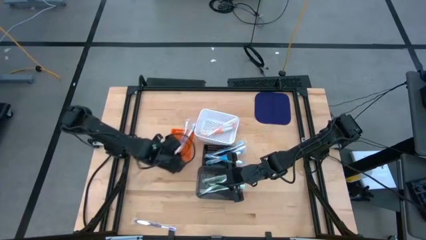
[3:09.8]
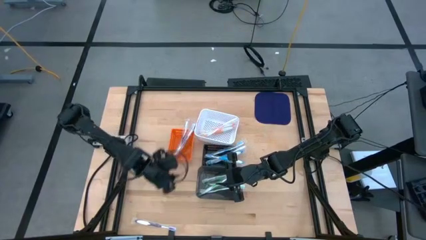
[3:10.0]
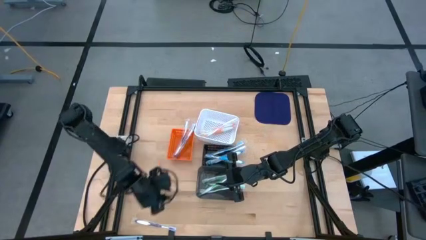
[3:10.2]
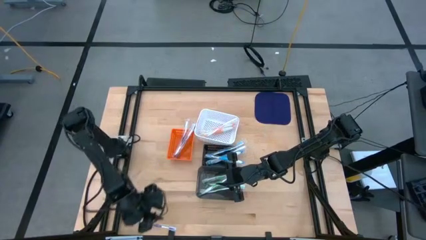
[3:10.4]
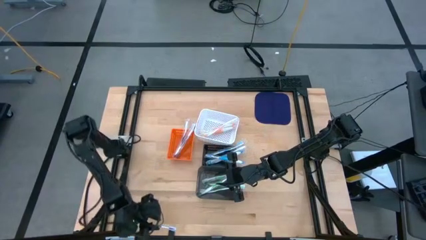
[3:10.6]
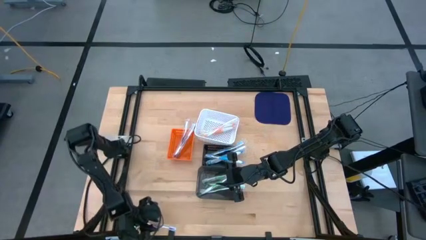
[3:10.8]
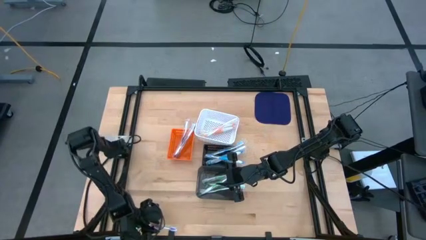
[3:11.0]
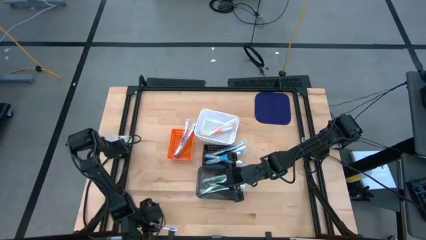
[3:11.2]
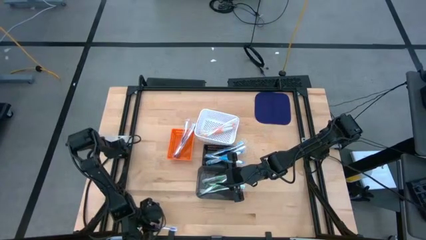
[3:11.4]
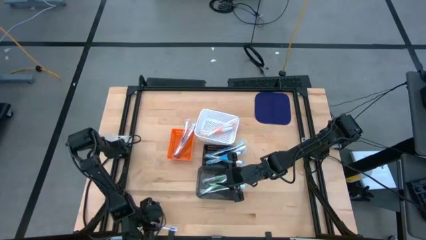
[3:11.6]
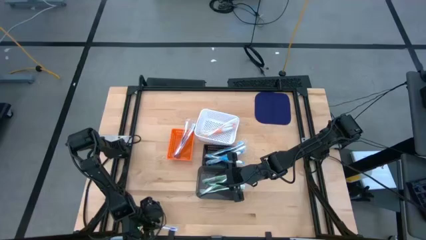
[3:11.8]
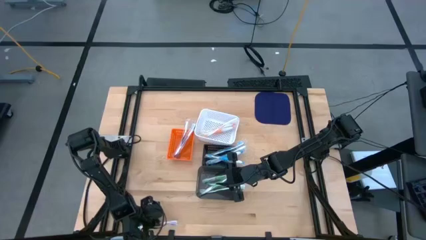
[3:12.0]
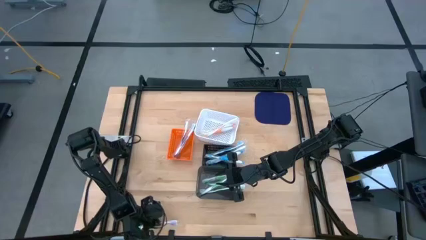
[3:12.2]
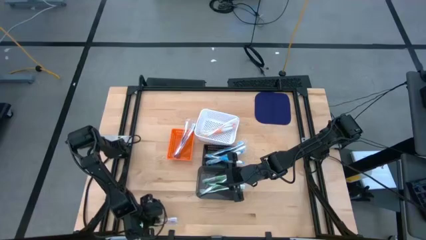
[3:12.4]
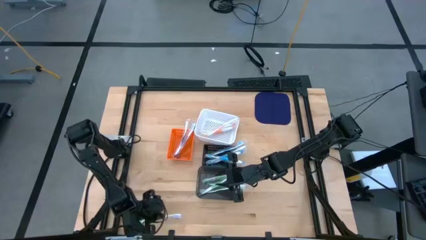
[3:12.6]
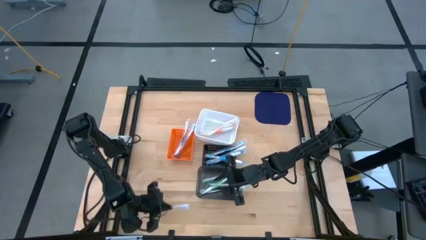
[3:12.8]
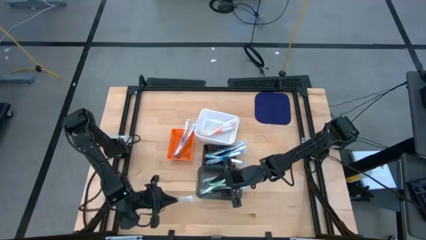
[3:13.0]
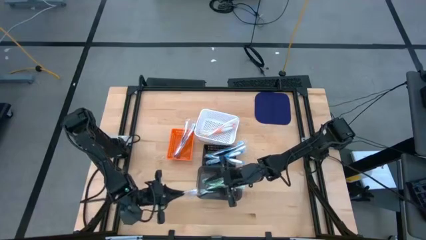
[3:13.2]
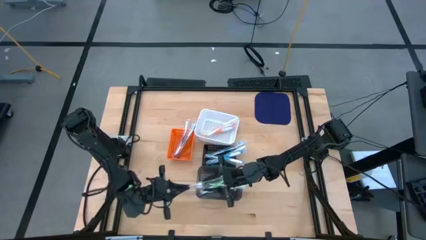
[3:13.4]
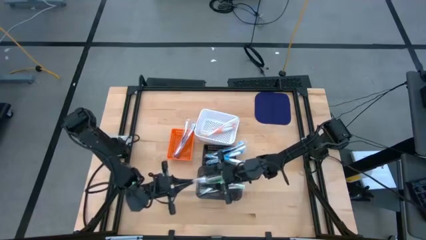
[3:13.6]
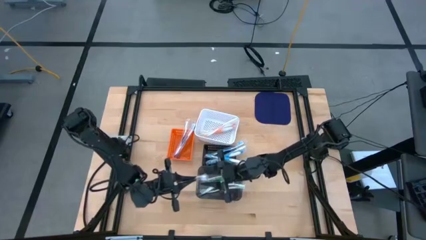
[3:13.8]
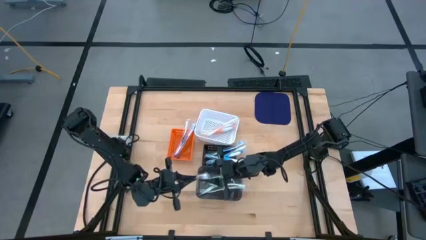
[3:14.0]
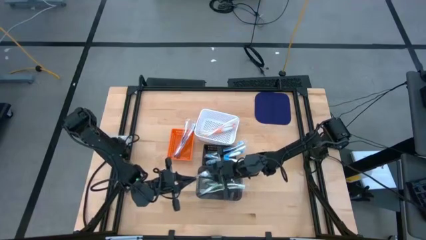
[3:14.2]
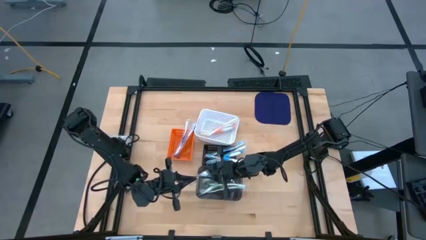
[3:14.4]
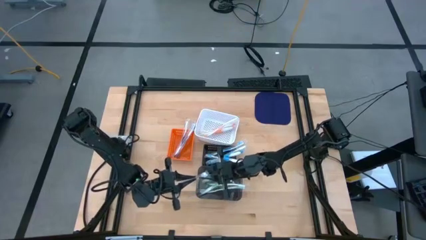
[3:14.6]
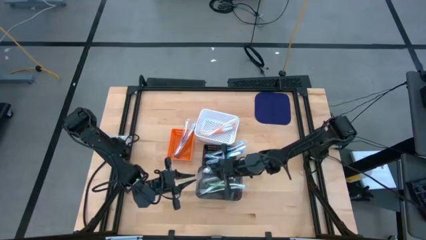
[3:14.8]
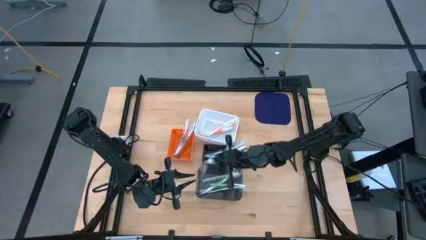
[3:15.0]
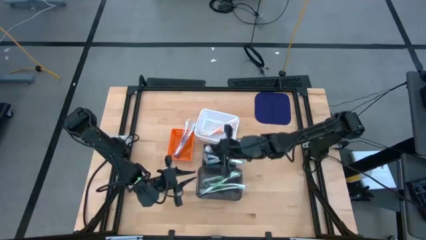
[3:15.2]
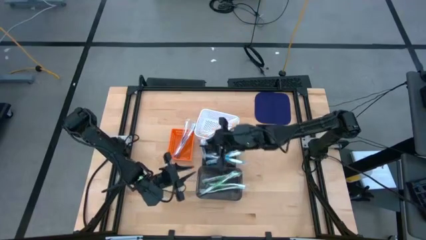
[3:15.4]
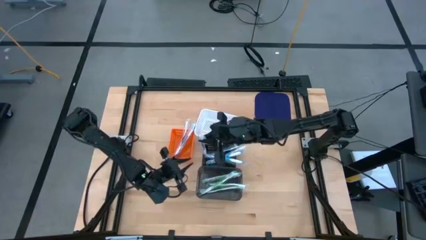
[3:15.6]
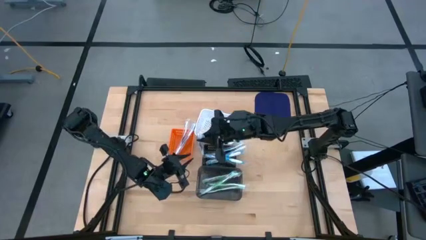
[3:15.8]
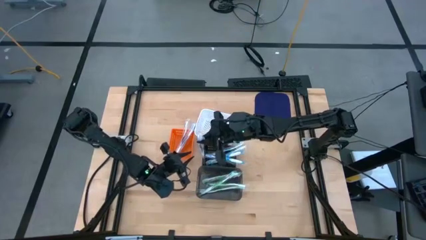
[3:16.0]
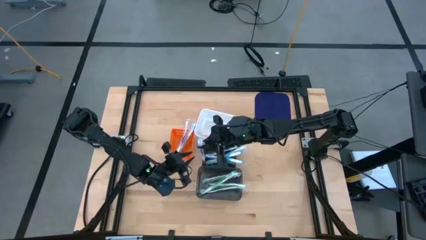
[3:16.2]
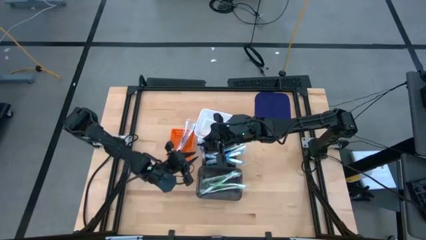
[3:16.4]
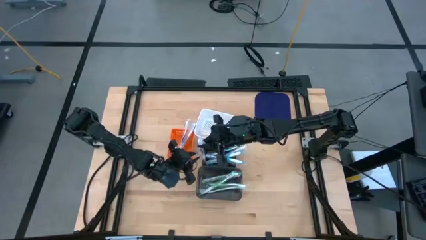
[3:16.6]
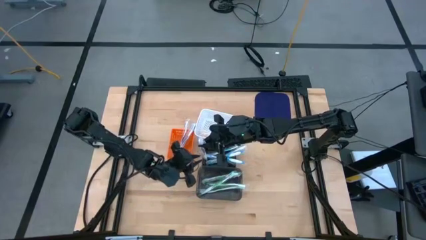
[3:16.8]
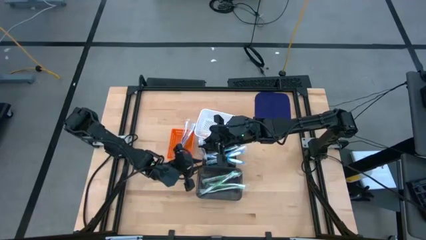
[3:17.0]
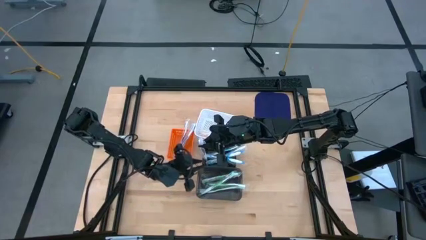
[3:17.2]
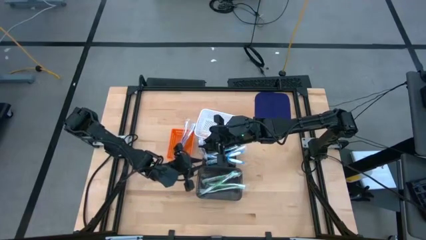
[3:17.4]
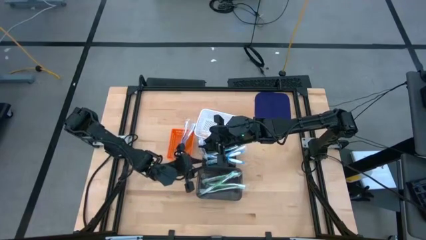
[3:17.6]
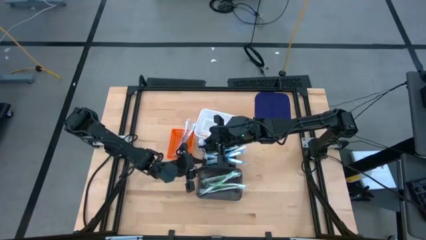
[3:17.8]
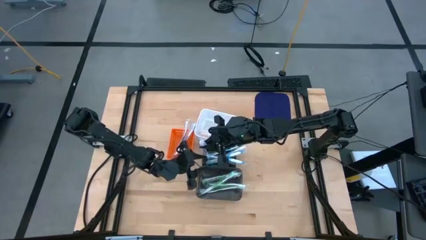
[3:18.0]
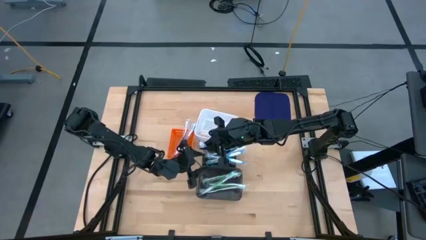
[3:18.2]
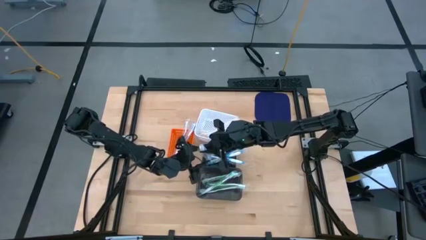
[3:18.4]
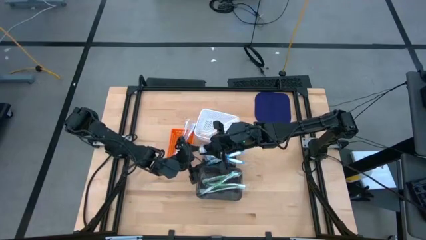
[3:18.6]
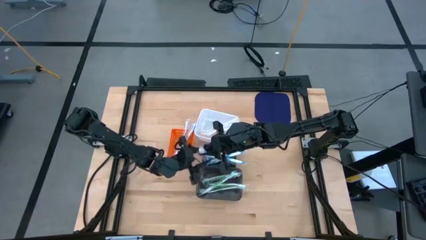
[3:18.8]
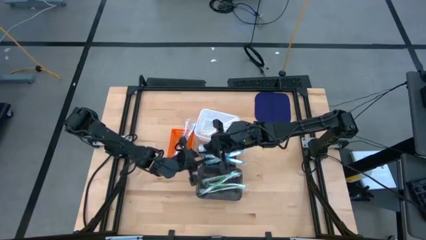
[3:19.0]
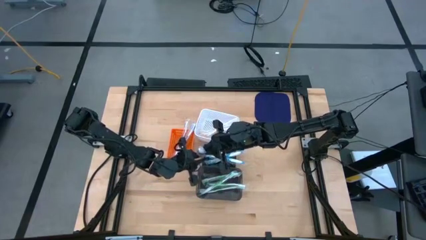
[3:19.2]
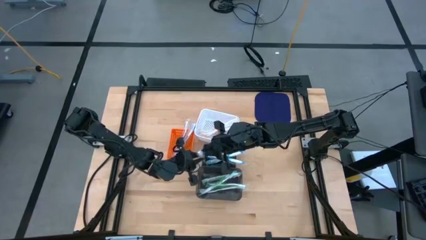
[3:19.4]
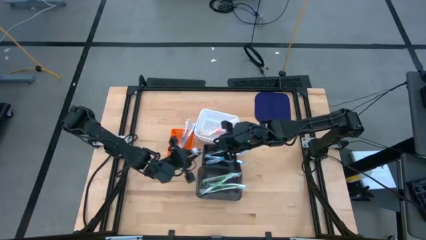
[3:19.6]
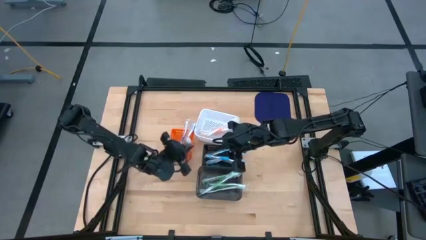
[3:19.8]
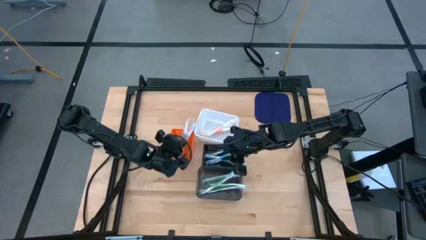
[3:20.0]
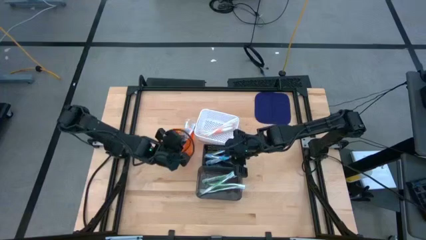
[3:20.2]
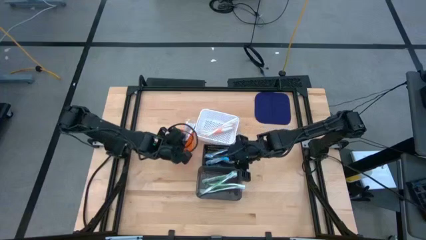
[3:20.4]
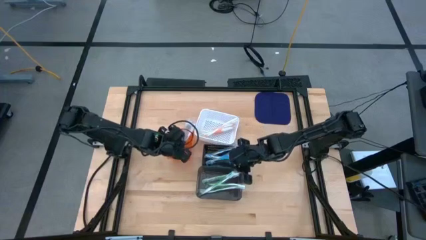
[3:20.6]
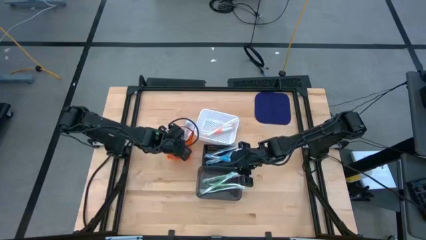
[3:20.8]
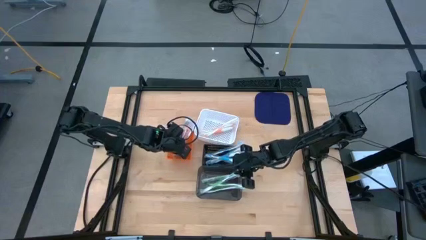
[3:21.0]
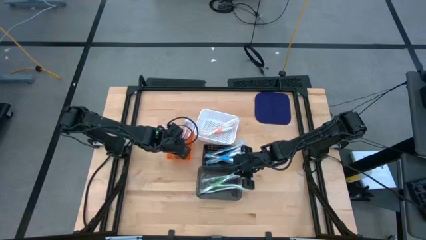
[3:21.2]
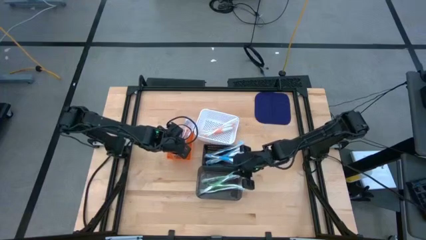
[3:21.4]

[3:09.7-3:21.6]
Task: Pick & Place Toothbrushes
Put the purple toothbrush into the orange basket

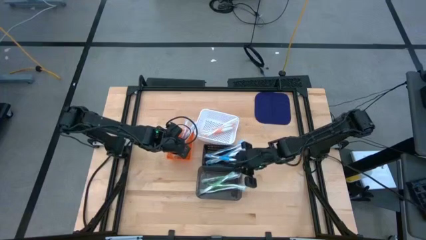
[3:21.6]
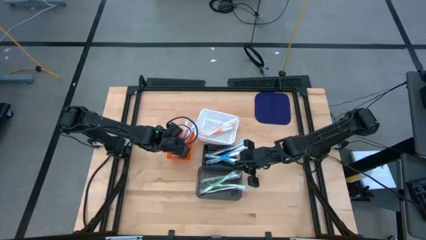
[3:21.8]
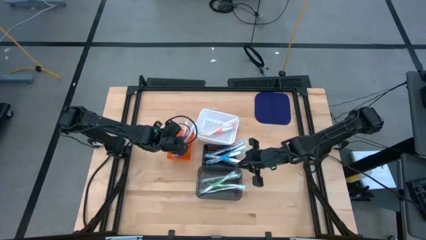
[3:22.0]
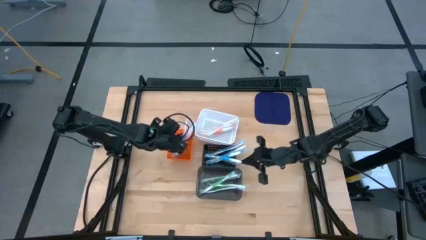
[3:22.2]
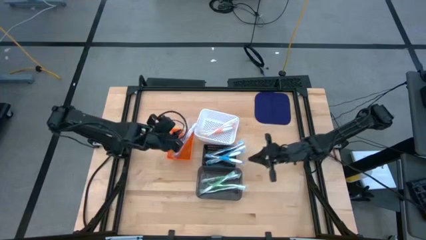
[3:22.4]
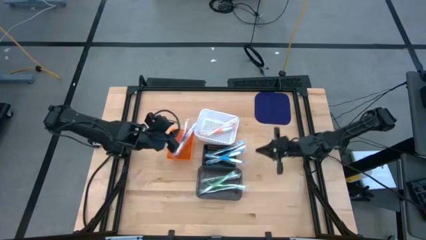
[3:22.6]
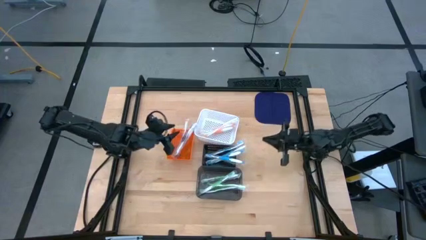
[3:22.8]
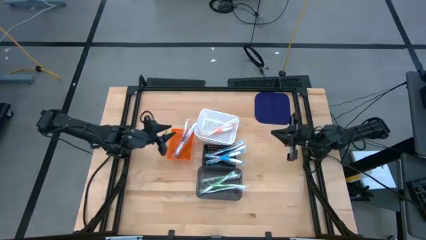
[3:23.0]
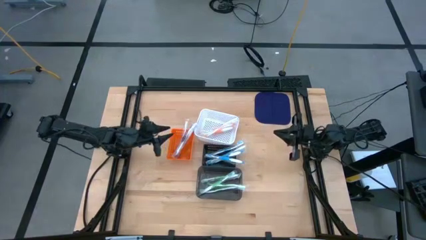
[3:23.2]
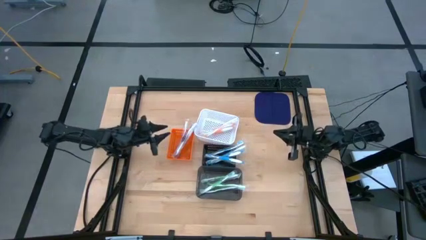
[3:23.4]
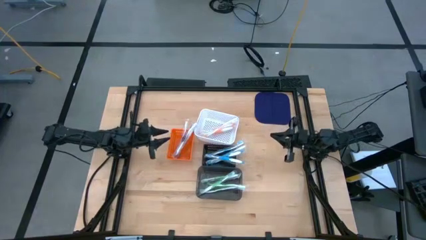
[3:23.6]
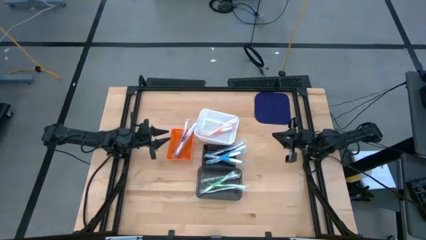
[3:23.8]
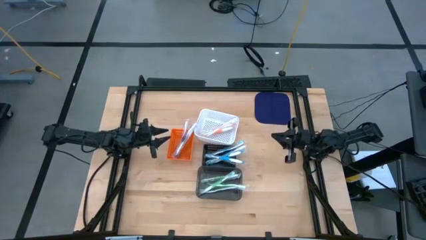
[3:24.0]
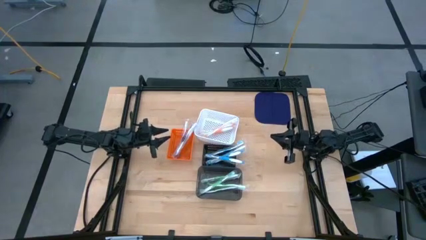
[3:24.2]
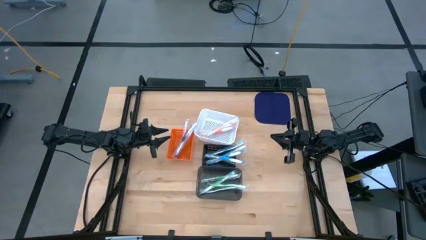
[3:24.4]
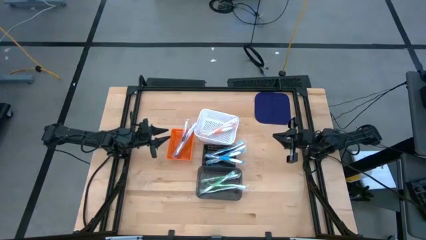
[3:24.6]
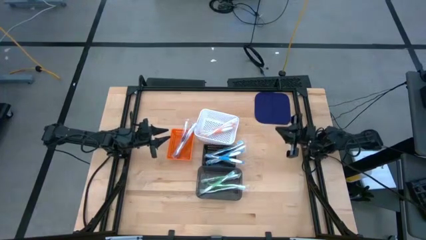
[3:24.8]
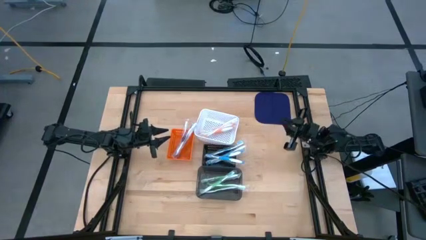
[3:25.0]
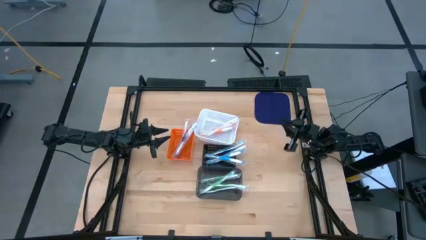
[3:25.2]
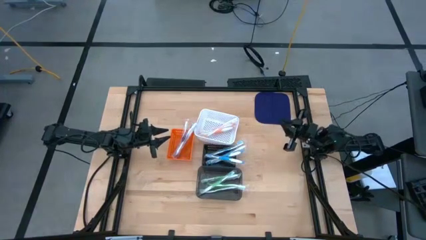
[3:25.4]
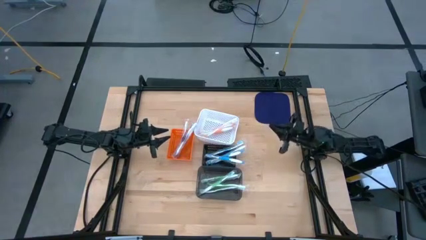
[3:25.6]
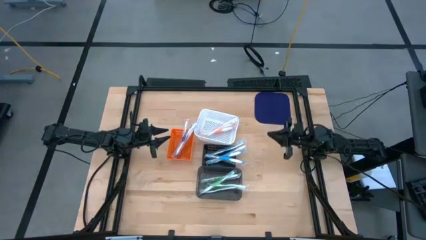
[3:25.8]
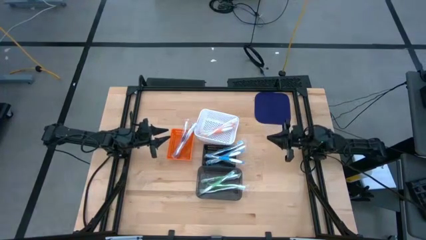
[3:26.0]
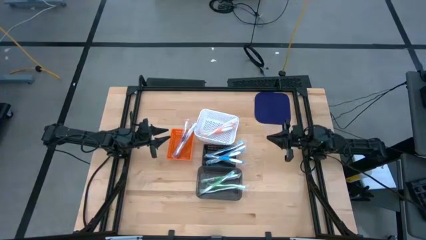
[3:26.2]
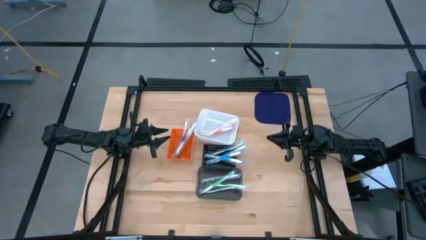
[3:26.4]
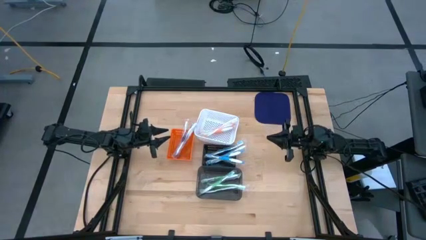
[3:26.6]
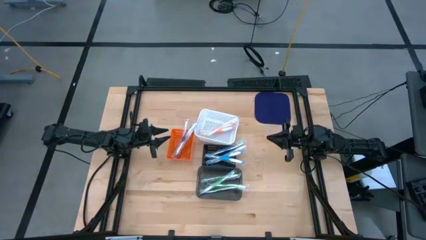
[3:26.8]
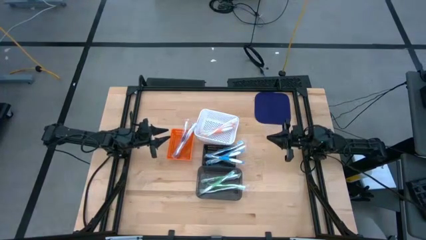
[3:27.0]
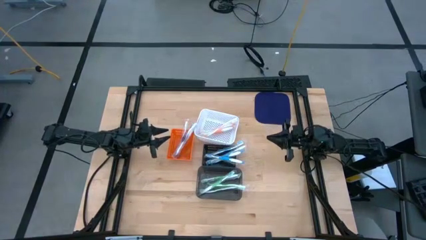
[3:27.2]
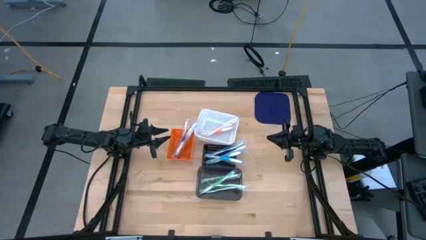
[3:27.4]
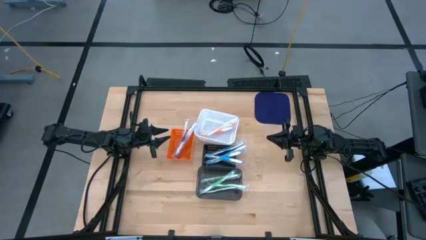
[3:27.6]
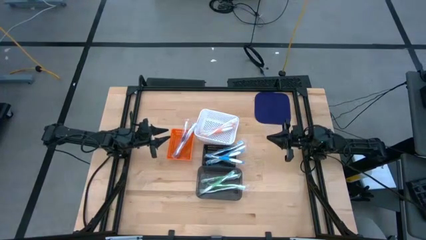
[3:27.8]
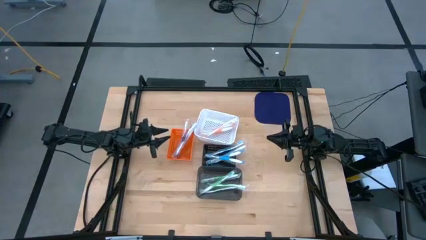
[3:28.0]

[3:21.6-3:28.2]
Return to Home Position
